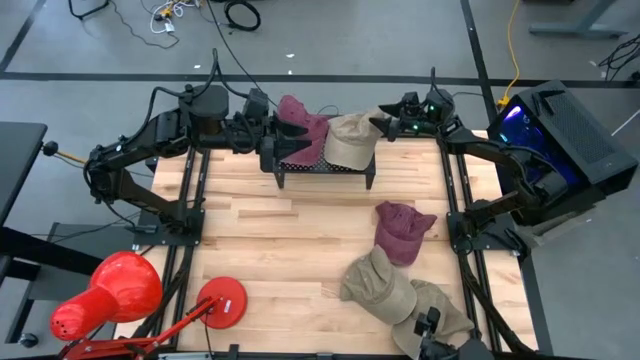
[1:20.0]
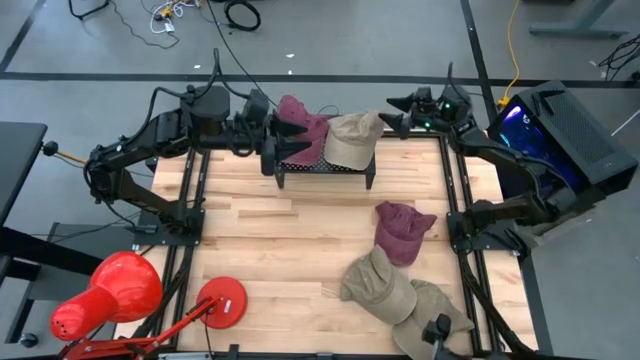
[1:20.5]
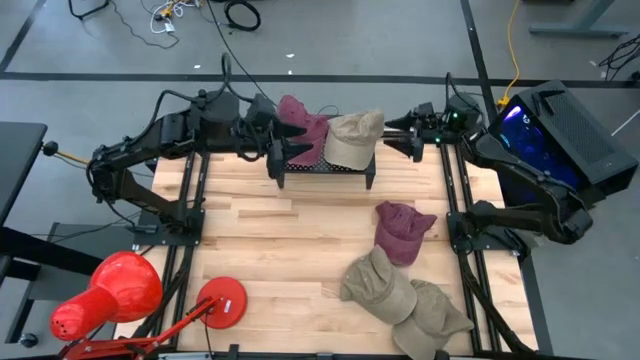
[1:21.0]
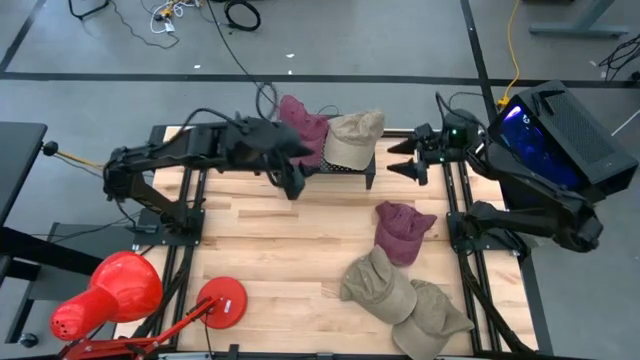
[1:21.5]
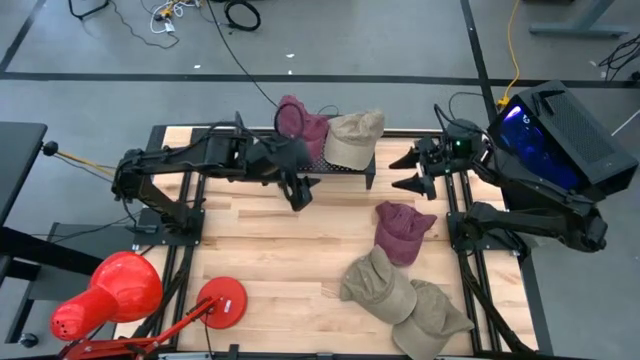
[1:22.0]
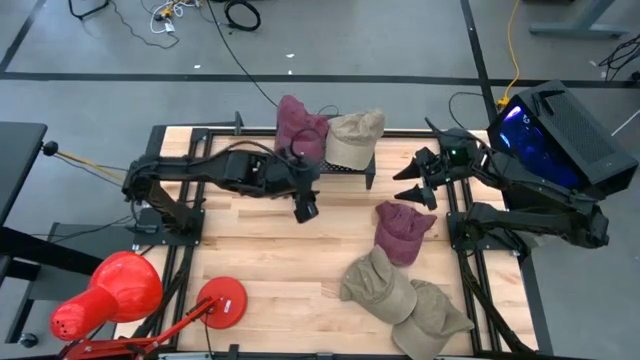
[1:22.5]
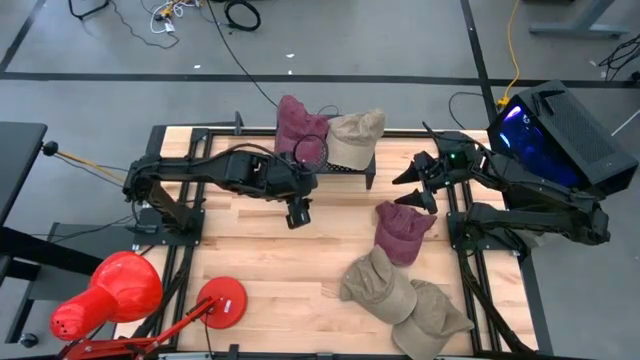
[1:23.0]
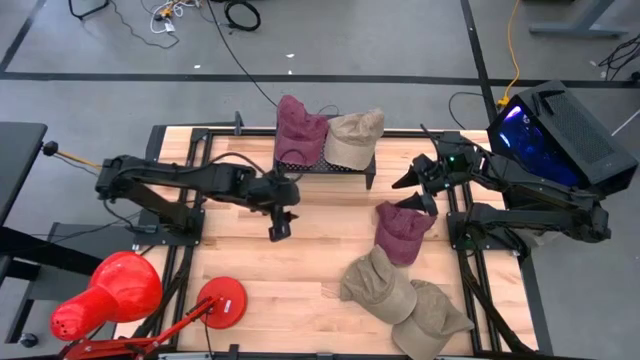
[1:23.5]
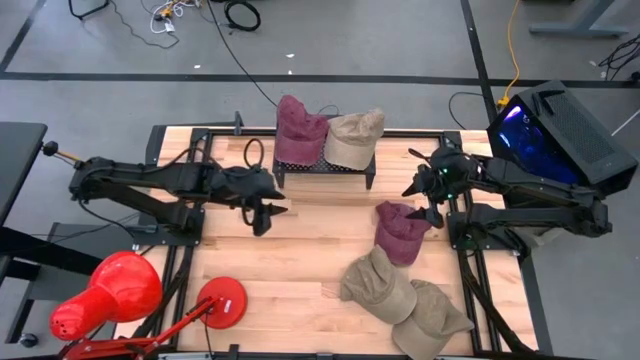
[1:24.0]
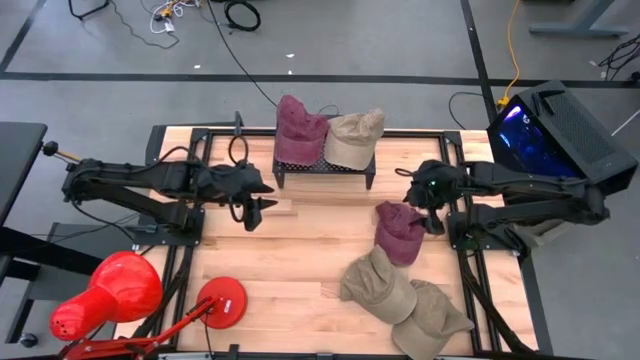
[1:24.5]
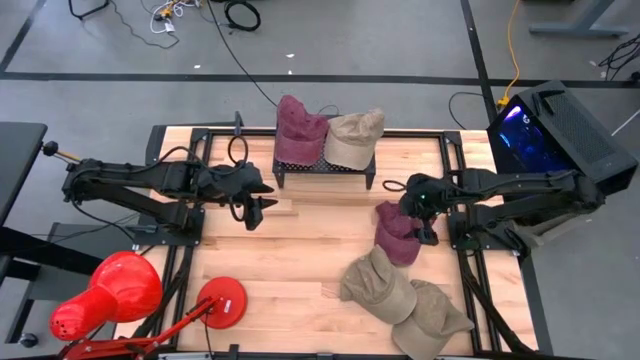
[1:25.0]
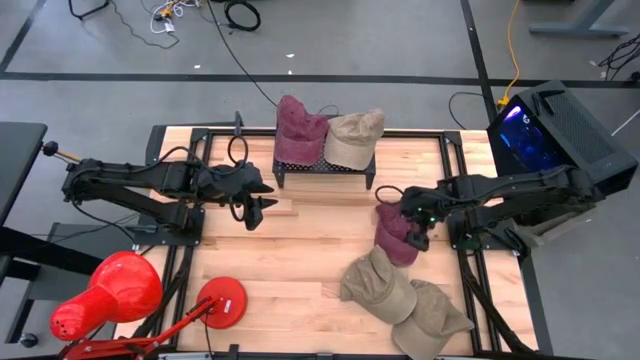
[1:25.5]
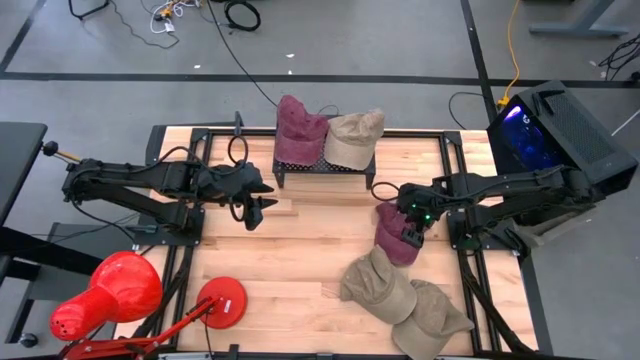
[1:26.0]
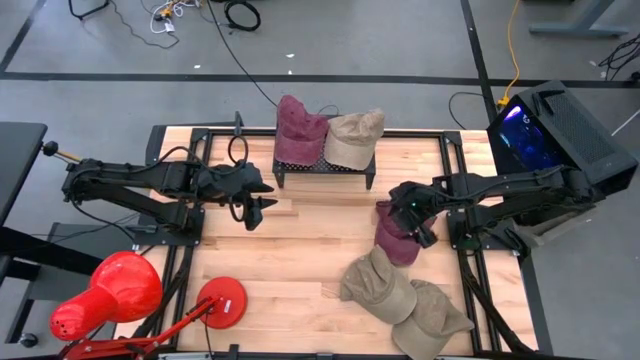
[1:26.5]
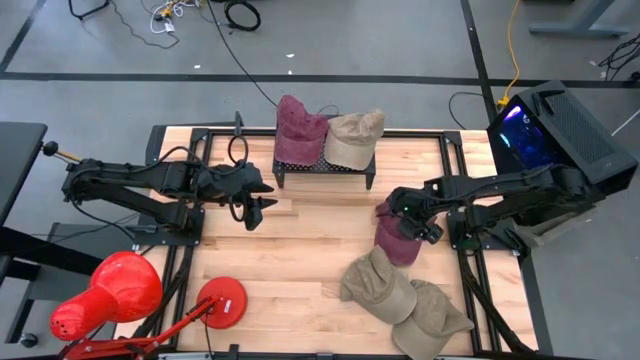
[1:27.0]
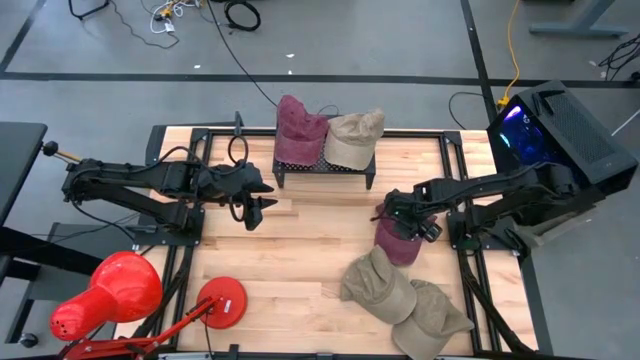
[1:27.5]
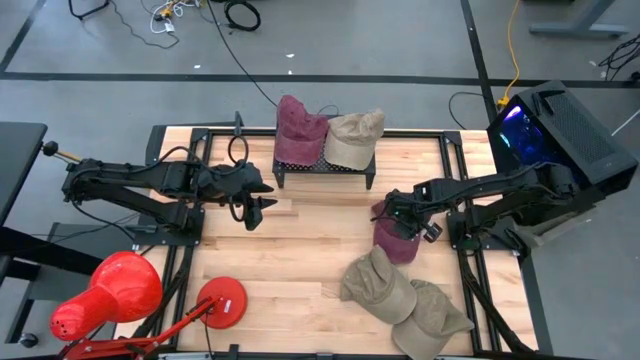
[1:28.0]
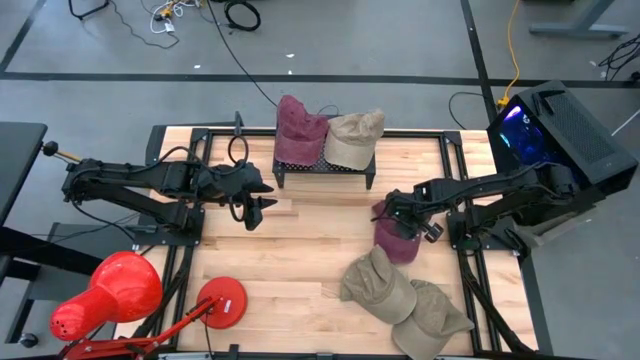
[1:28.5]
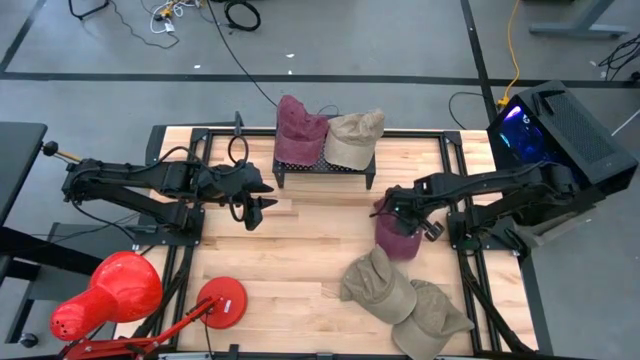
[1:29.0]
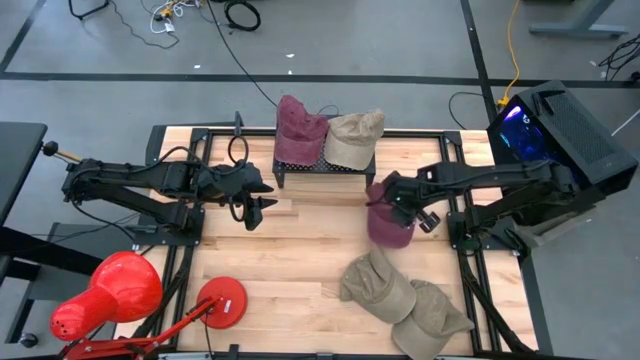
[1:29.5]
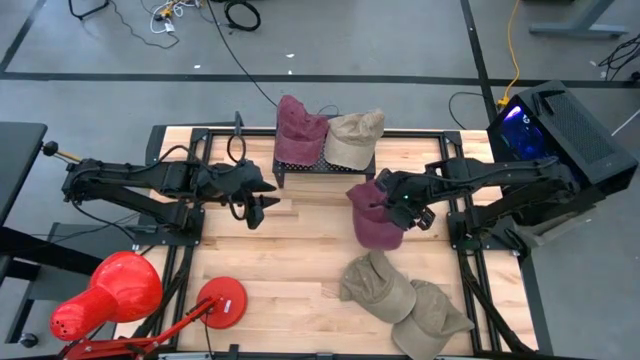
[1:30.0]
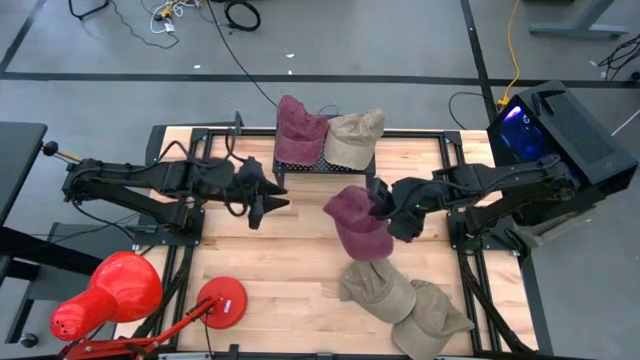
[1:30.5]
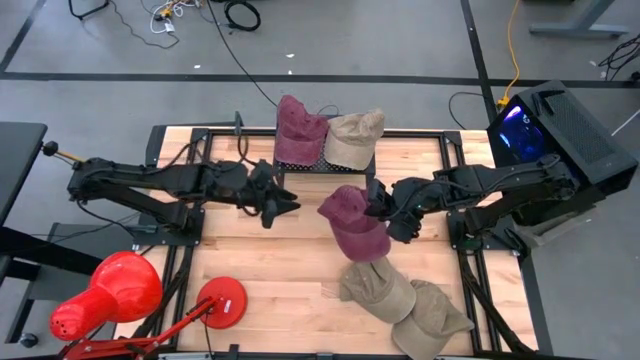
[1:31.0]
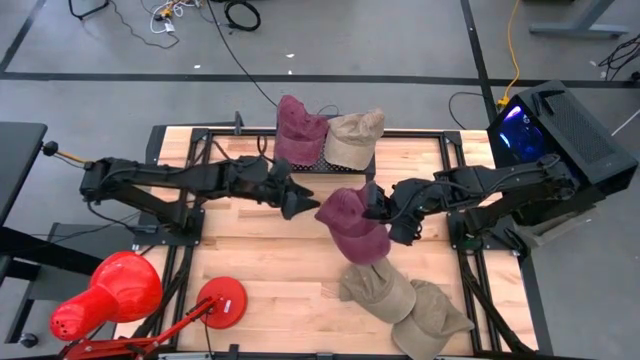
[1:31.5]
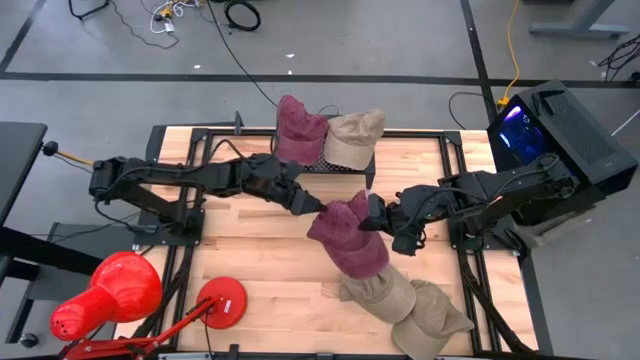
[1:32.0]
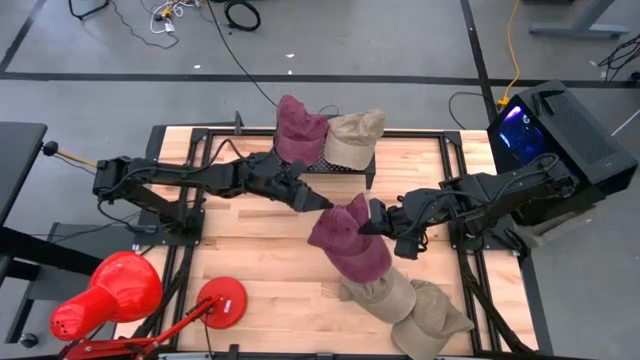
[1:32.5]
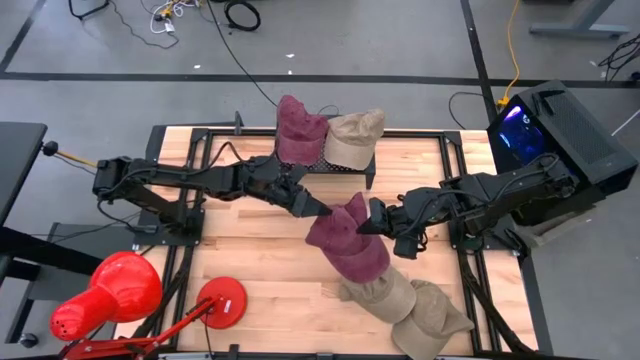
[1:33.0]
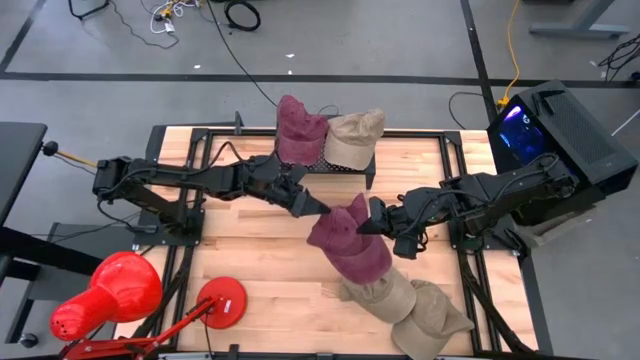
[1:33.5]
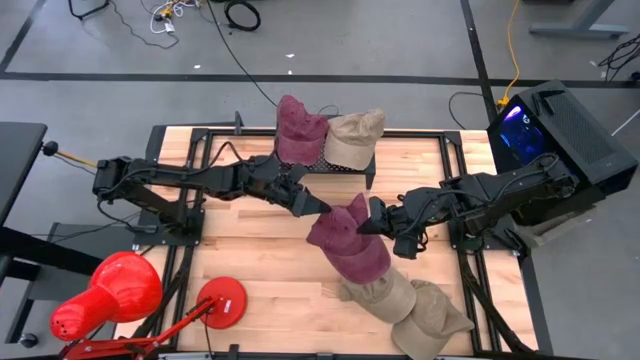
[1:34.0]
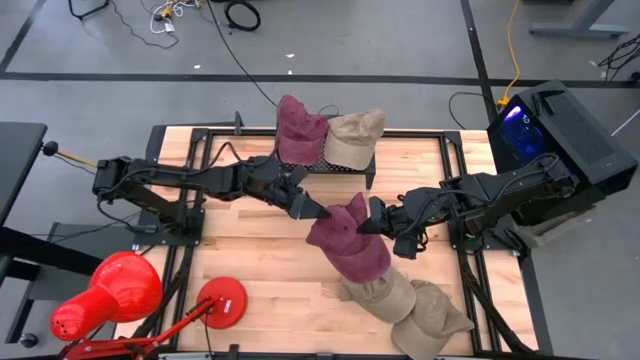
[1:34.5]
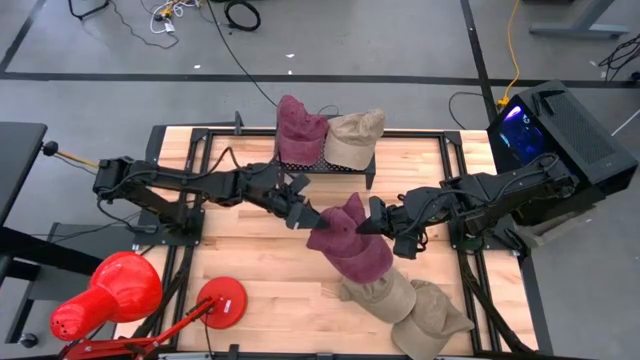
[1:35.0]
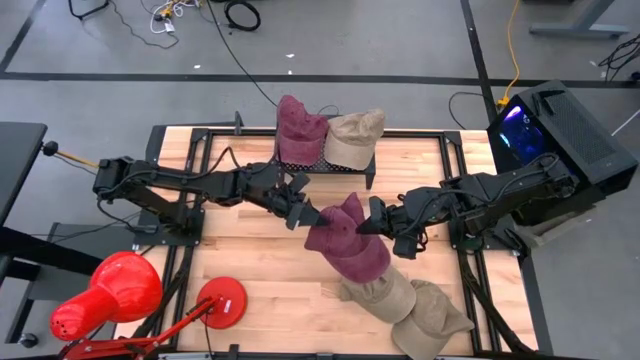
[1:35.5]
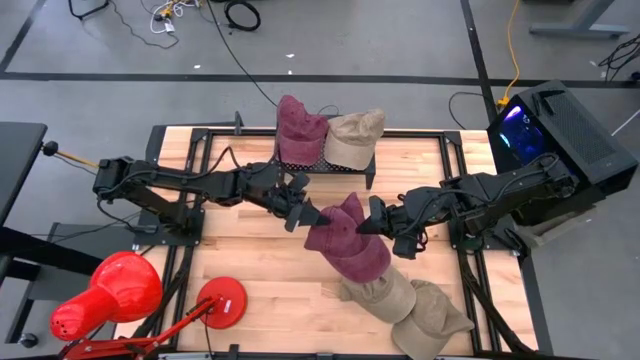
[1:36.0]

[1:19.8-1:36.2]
Task: Pick & Place hat
Stack the red cap on top of the red cap on the shelf

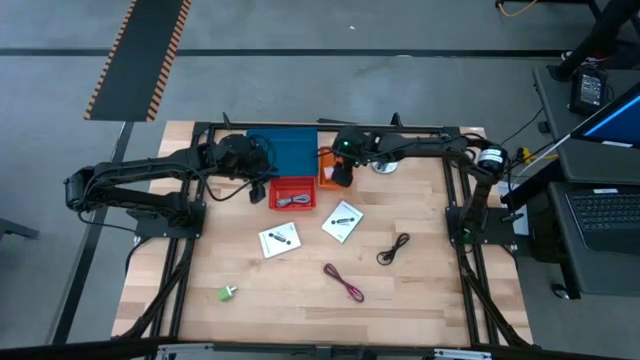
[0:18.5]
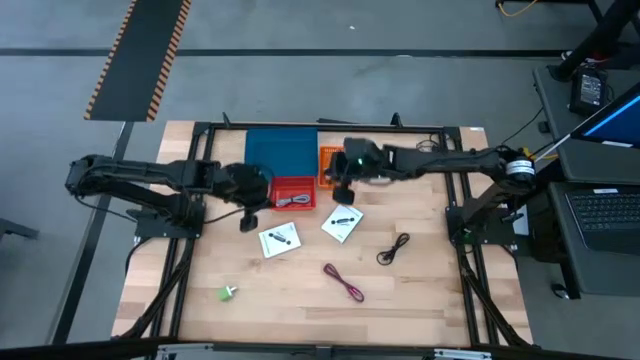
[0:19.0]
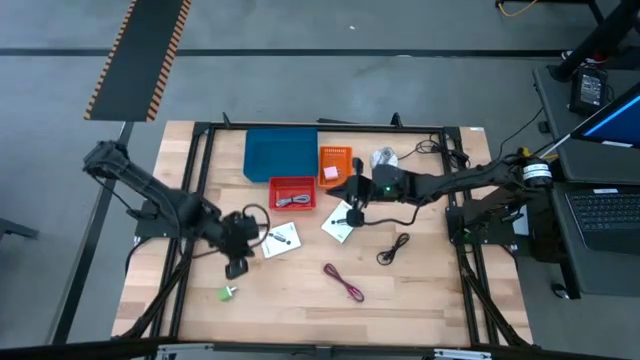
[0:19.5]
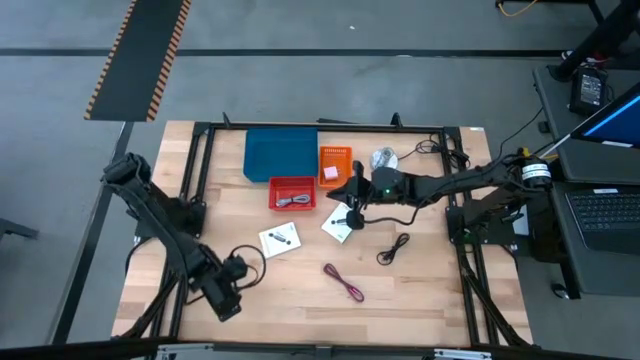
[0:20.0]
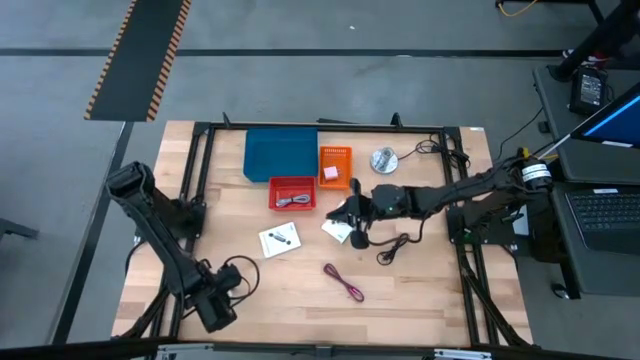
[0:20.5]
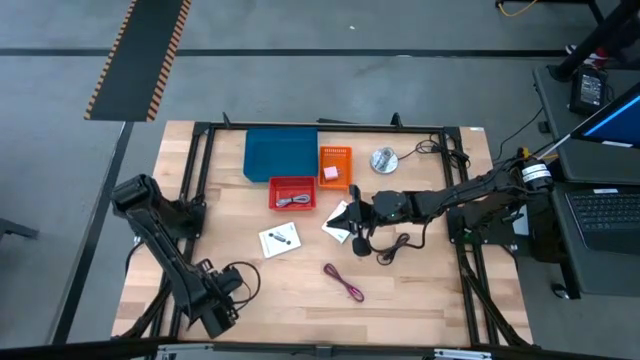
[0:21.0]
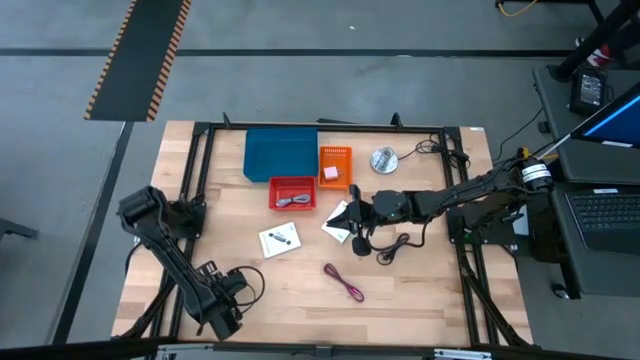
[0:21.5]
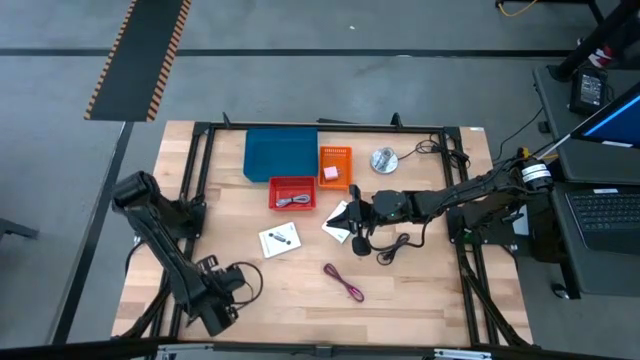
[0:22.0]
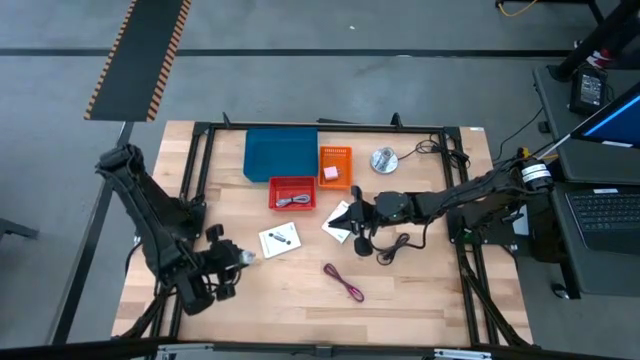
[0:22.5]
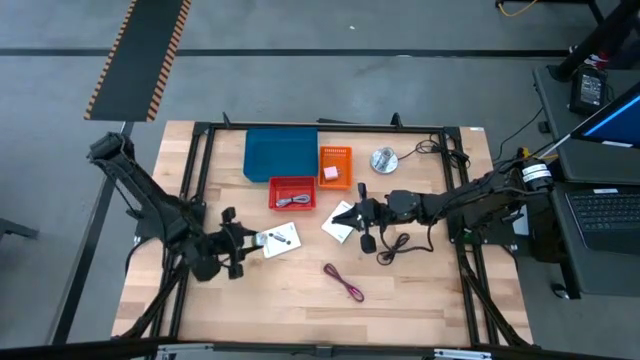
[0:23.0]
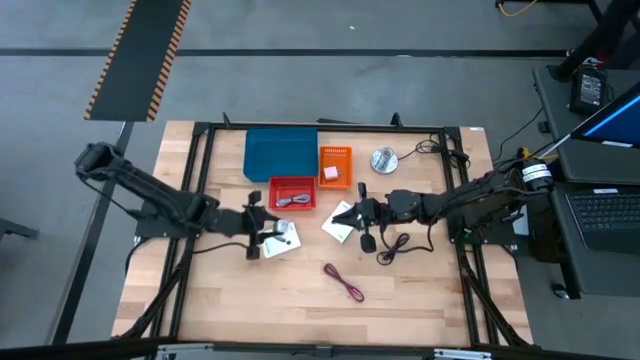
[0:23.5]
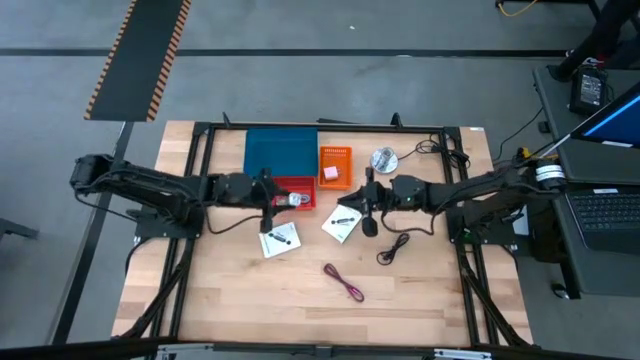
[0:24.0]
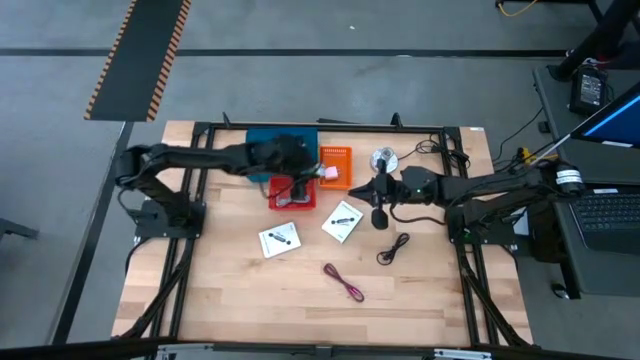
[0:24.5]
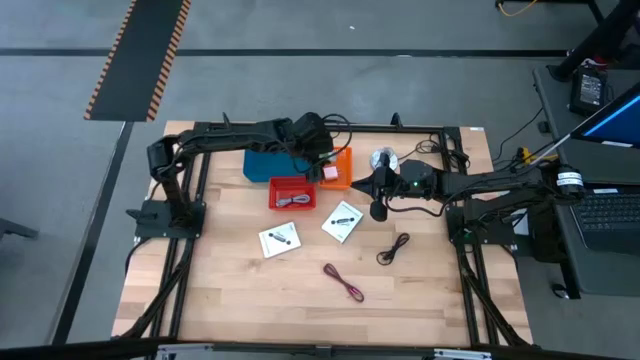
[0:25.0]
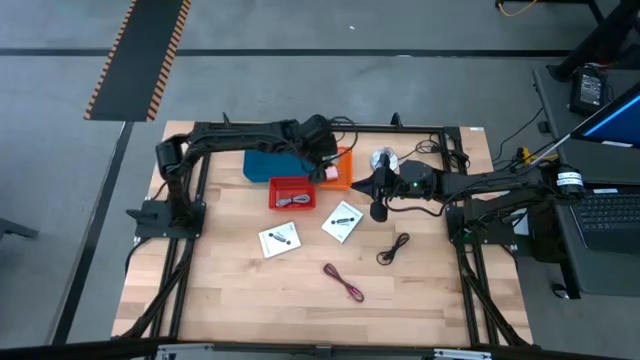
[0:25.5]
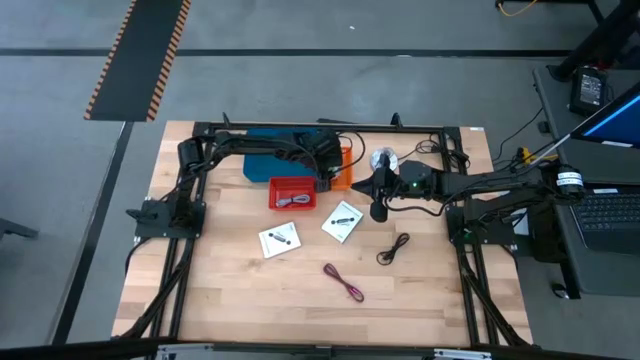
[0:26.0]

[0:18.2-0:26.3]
Task: Pick and place items into bin
Put the green charger adapter into the orange bin
